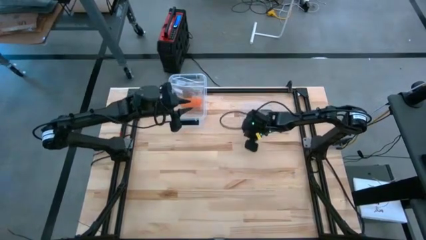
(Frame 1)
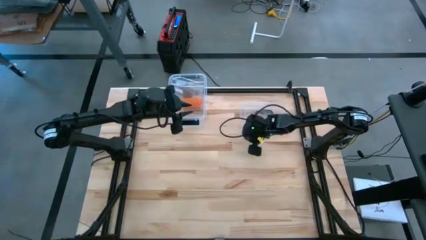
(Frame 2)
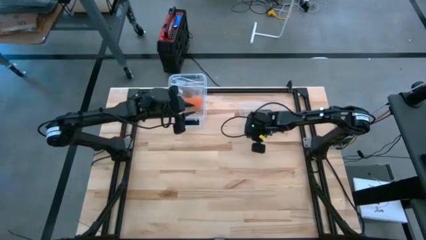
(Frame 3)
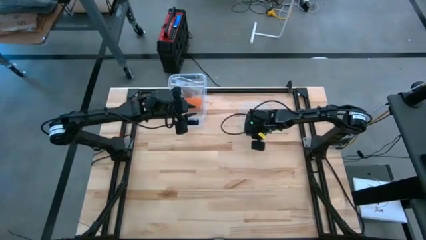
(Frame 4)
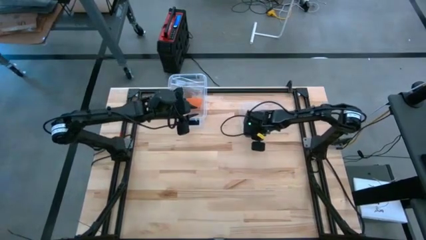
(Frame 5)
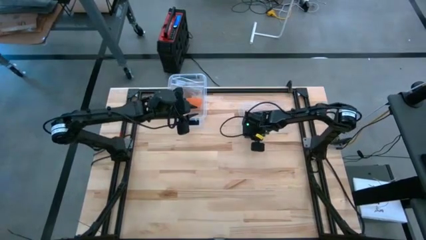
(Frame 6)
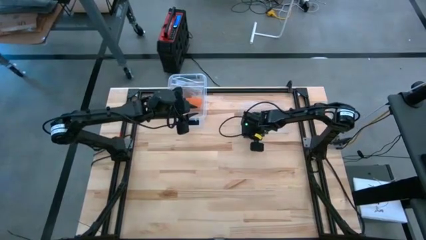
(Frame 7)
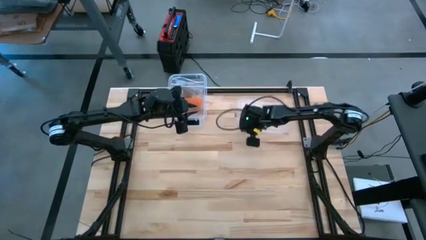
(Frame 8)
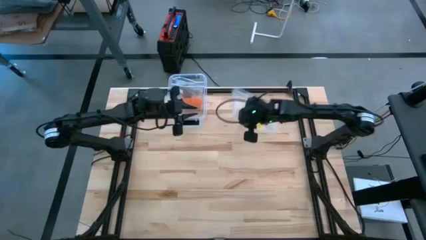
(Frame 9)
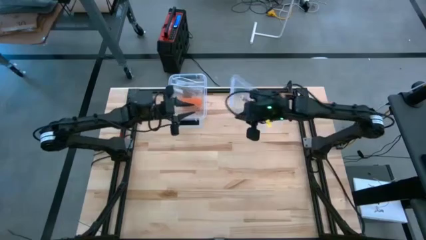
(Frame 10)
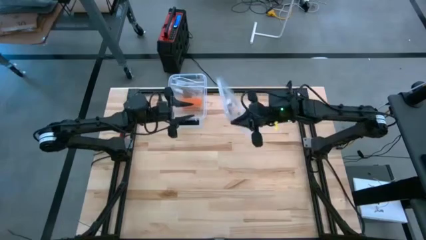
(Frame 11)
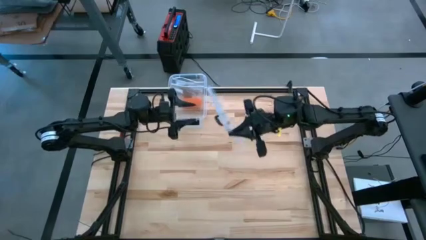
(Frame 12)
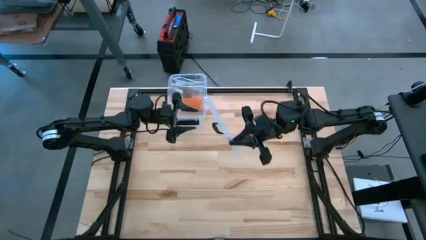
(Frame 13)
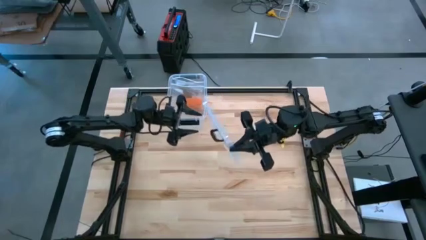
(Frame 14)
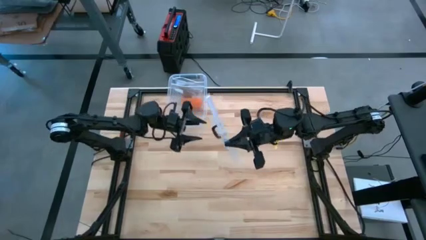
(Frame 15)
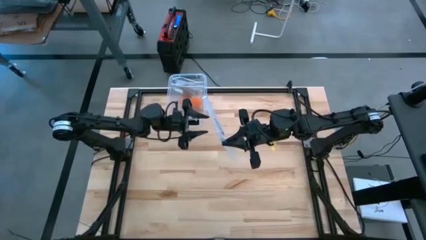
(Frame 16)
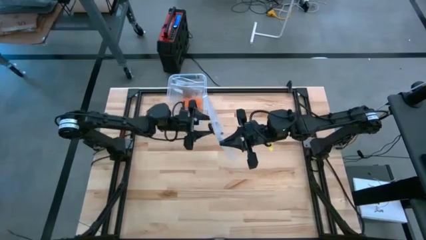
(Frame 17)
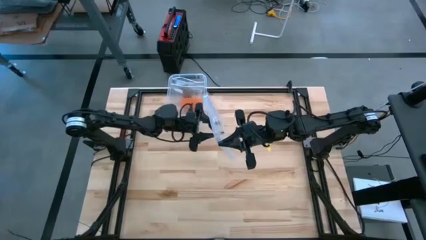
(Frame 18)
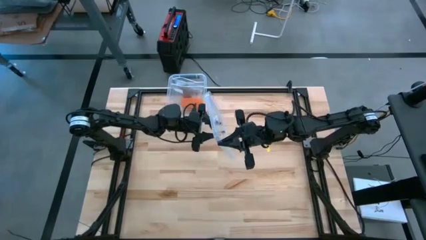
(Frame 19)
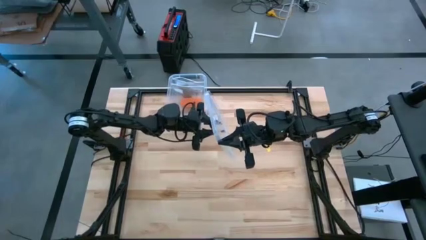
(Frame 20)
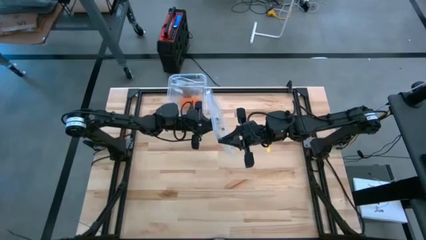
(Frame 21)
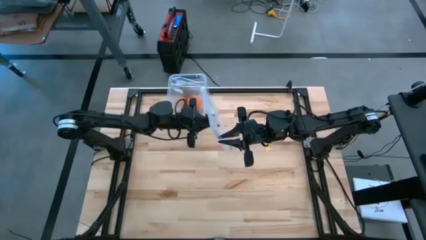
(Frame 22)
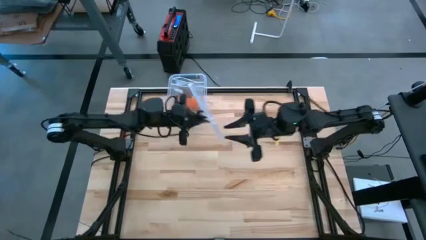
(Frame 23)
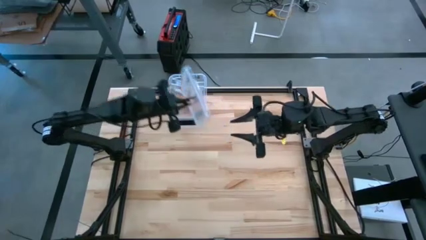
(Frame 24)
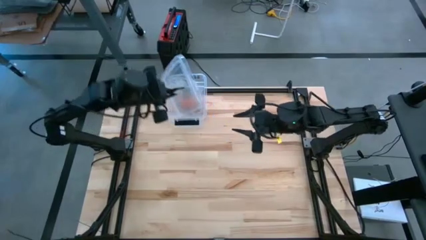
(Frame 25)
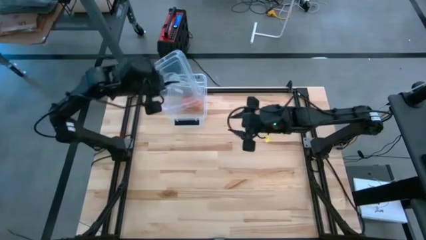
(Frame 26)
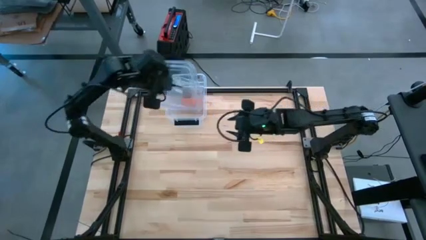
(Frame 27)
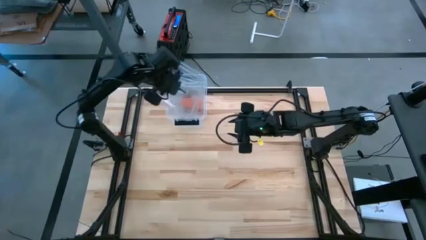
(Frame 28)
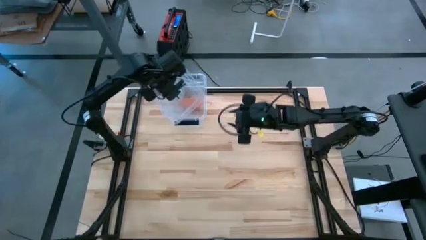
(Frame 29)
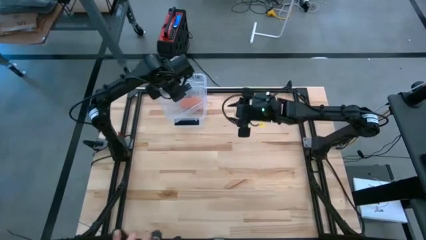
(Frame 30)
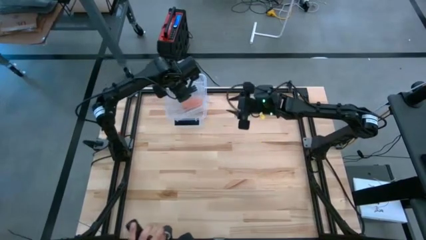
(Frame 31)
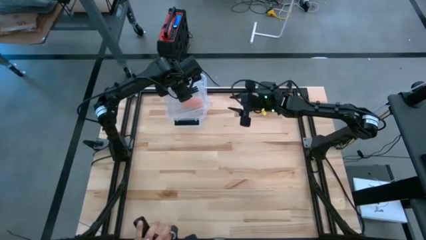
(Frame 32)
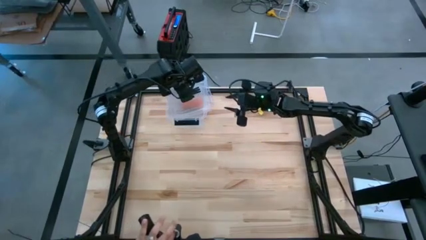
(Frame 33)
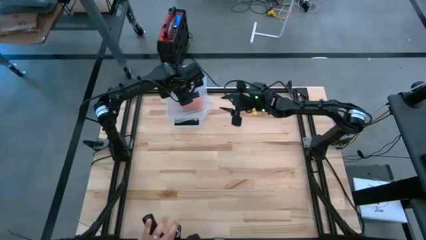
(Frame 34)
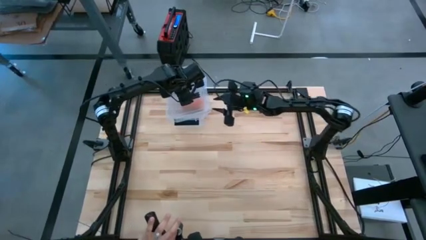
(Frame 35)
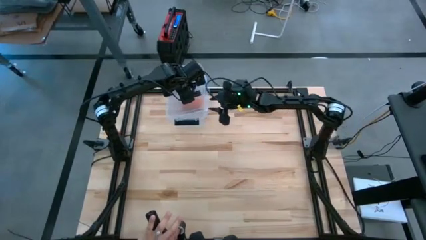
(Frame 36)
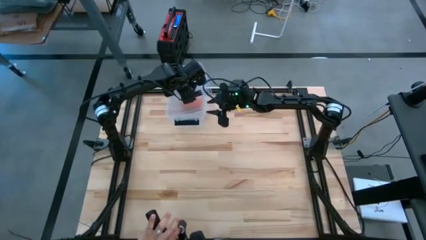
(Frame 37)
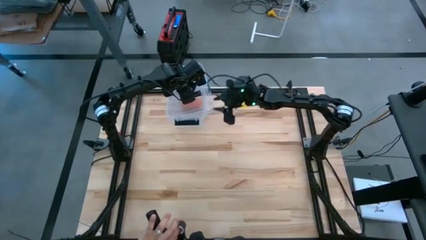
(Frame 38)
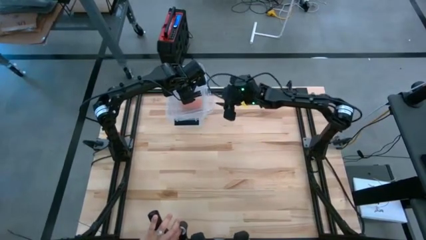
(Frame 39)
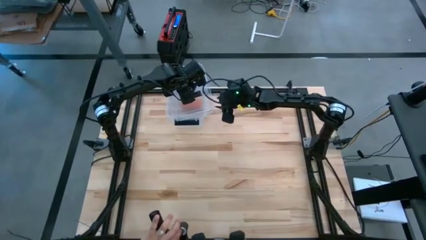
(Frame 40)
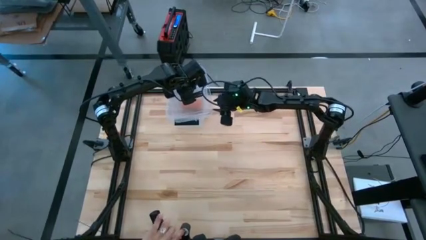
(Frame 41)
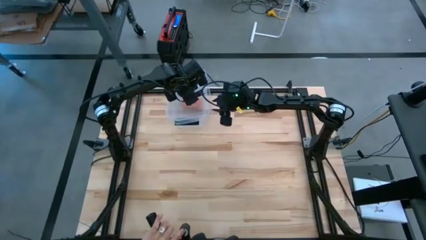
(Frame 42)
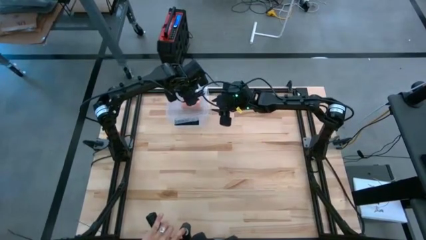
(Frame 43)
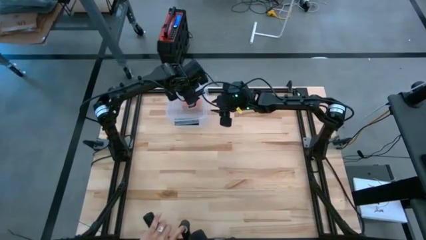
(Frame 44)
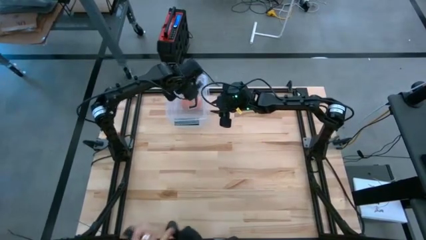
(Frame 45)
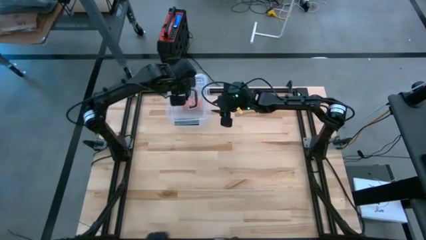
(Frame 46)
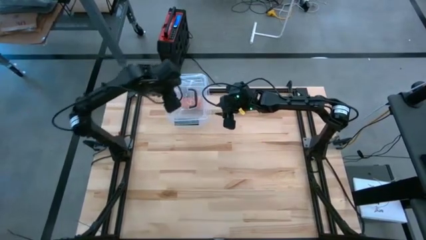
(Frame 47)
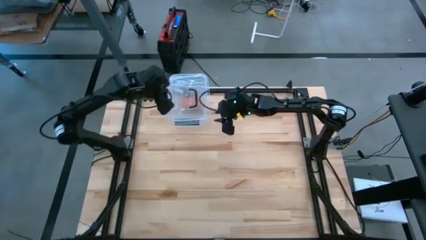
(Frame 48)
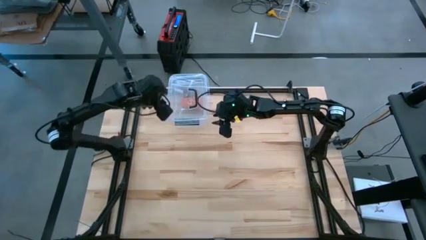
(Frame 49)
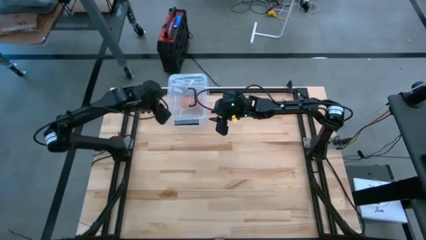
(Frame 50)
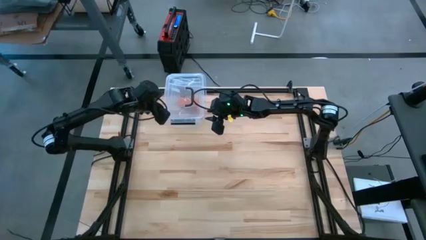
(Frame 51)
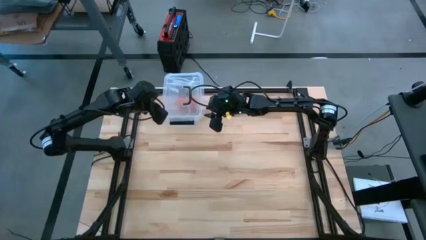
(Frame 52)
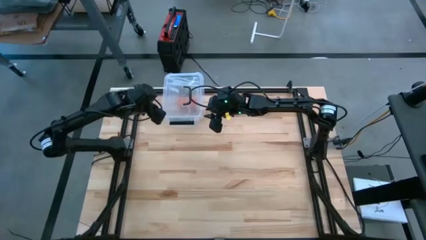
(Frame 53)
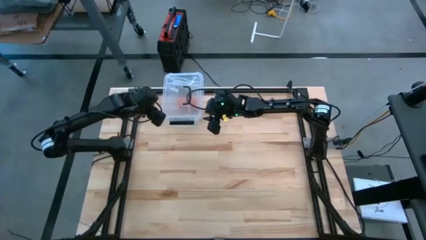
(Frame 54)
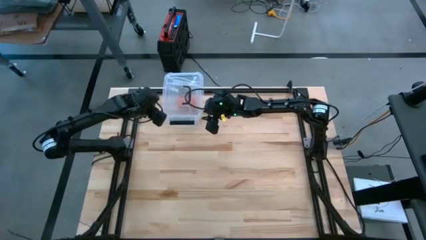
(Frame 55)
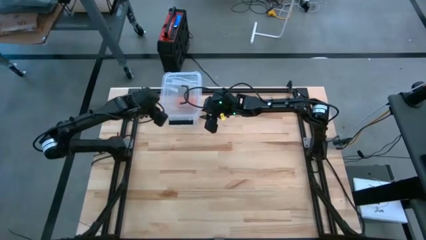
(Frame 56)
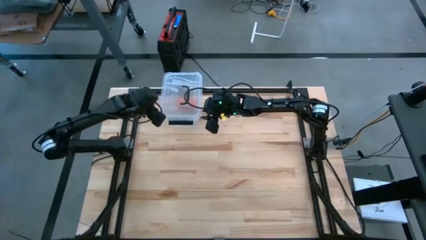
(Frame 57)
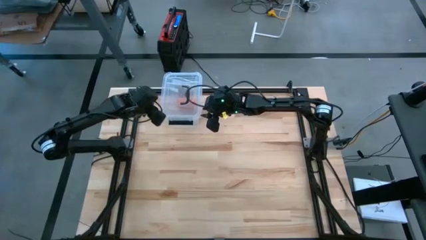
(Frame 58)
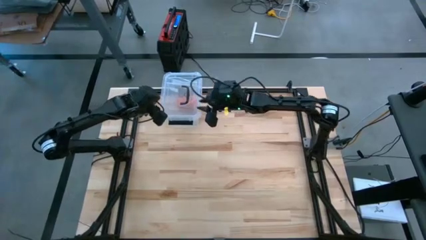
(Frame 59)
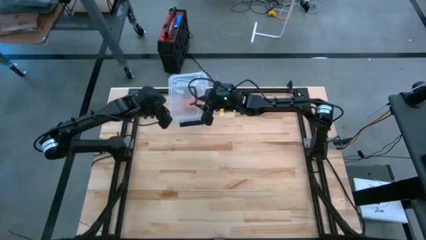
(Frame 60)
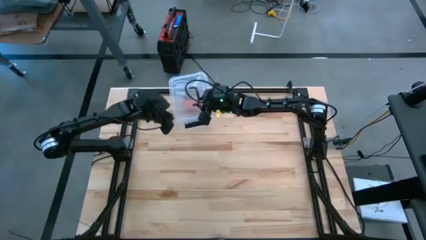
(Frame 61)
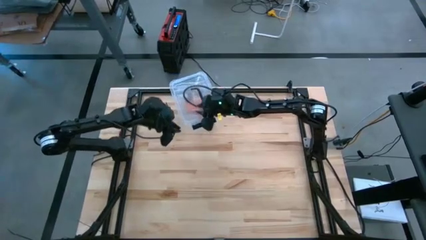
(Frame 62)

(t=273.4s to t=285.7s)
Task: Roll bandage
Close the transparent container
